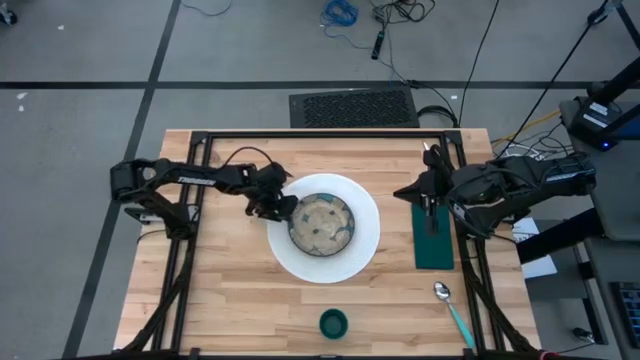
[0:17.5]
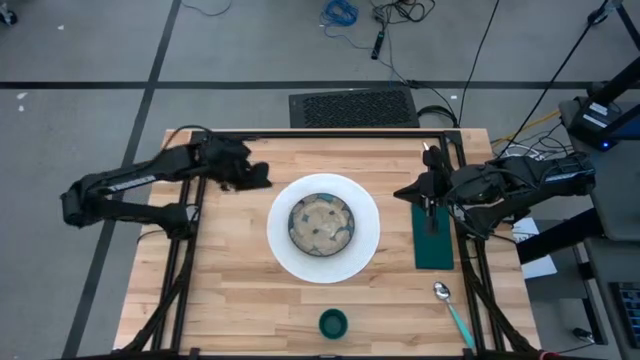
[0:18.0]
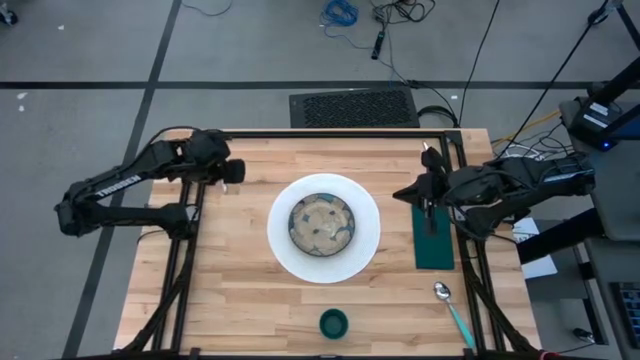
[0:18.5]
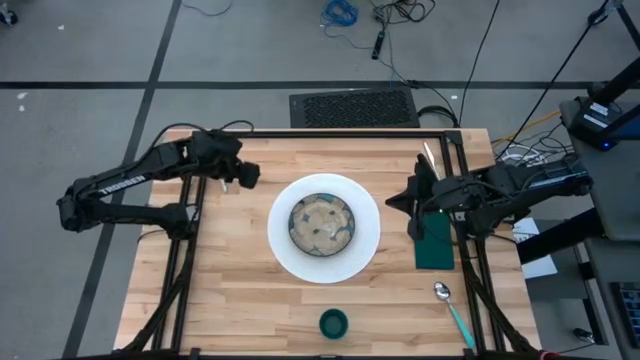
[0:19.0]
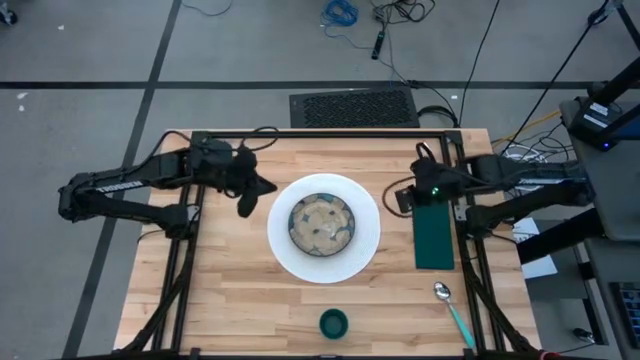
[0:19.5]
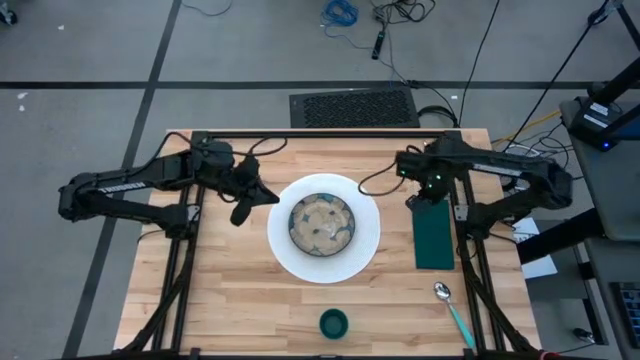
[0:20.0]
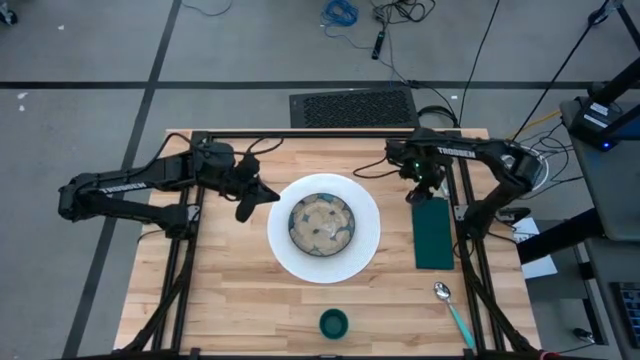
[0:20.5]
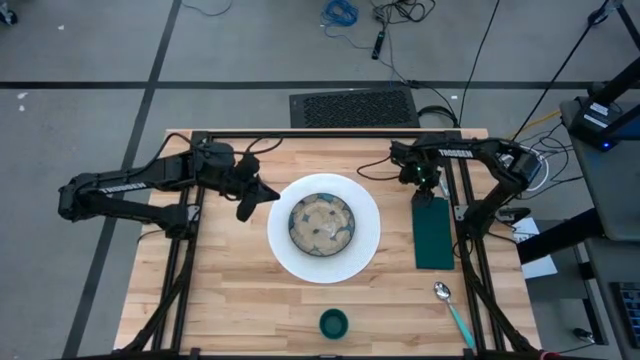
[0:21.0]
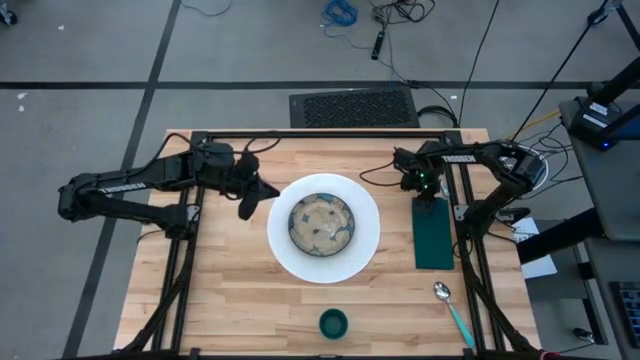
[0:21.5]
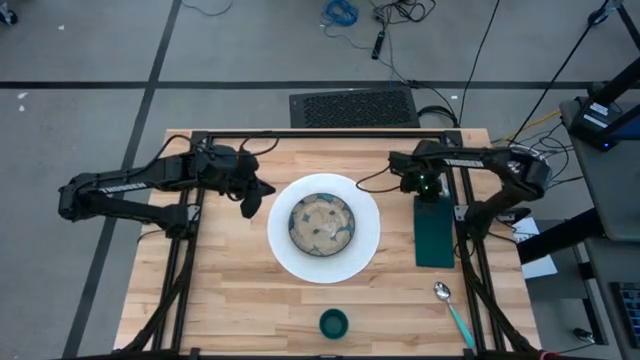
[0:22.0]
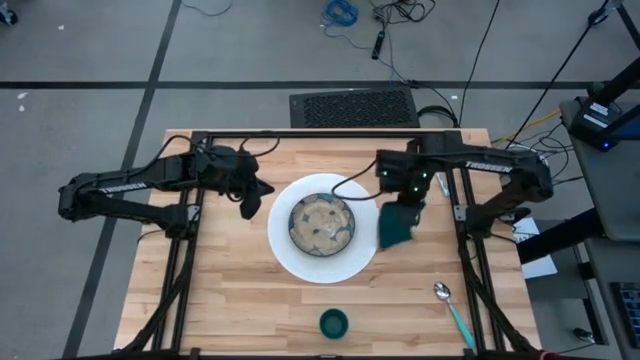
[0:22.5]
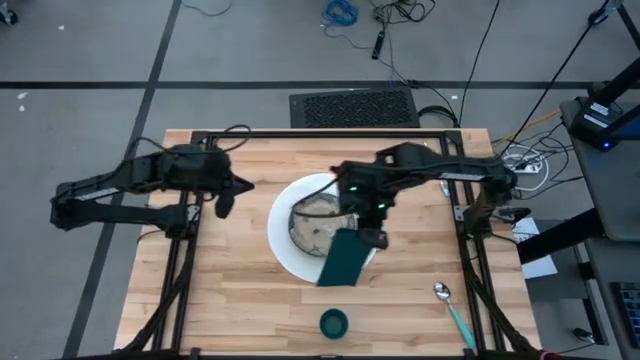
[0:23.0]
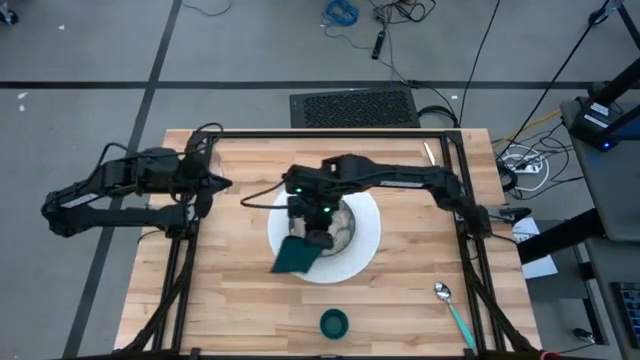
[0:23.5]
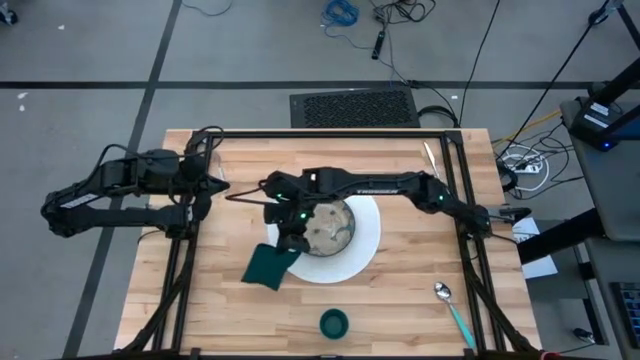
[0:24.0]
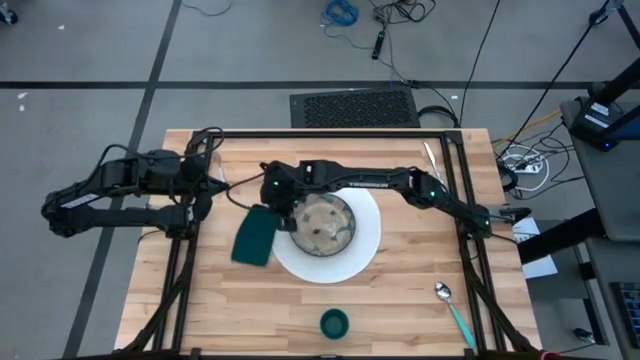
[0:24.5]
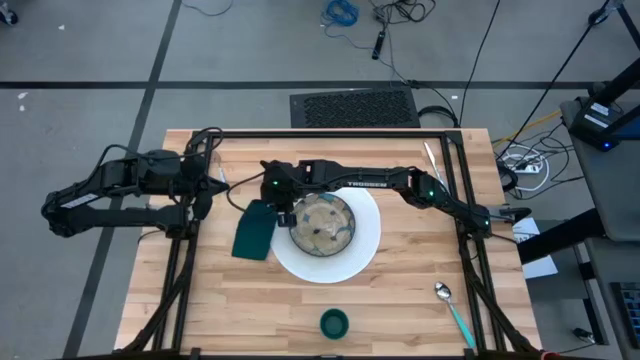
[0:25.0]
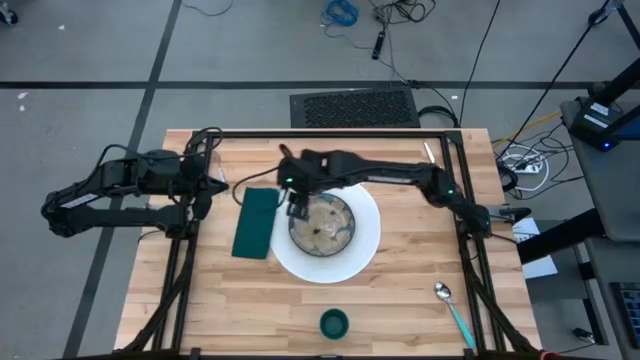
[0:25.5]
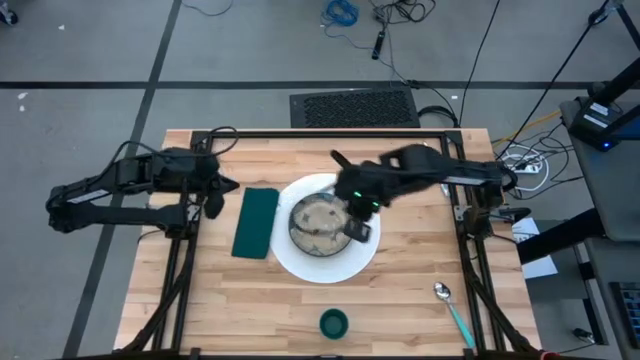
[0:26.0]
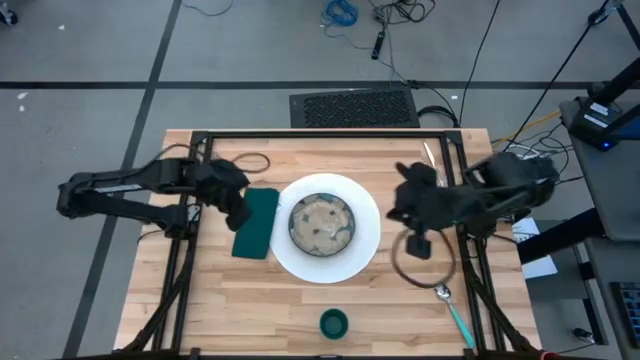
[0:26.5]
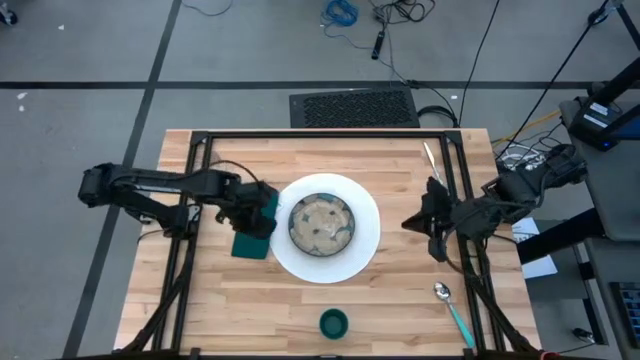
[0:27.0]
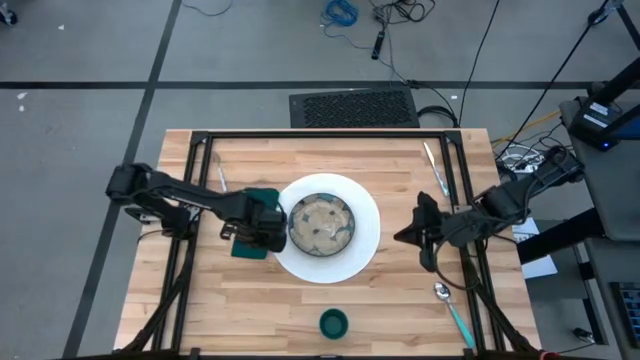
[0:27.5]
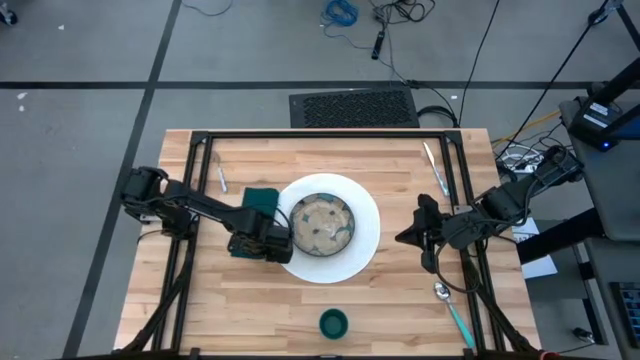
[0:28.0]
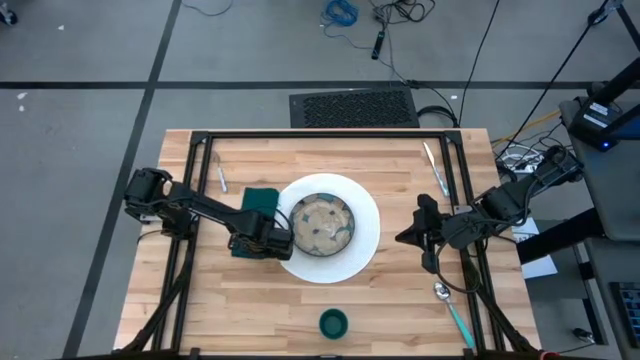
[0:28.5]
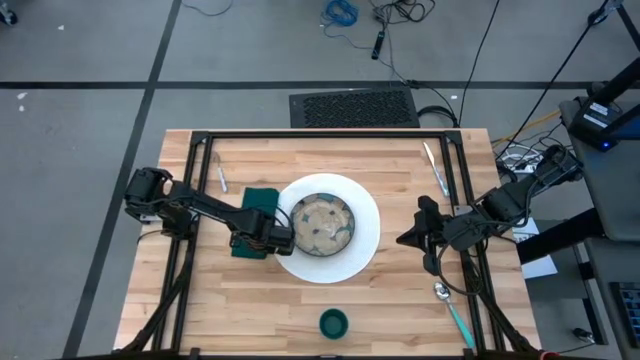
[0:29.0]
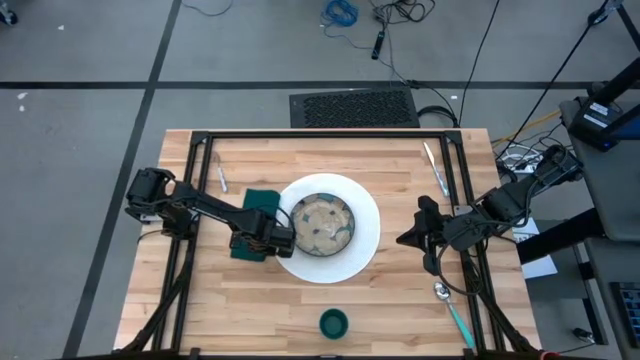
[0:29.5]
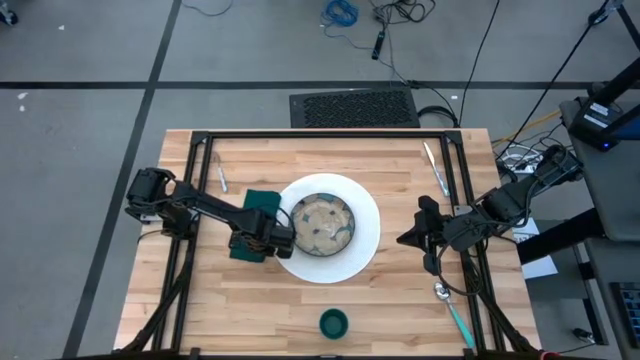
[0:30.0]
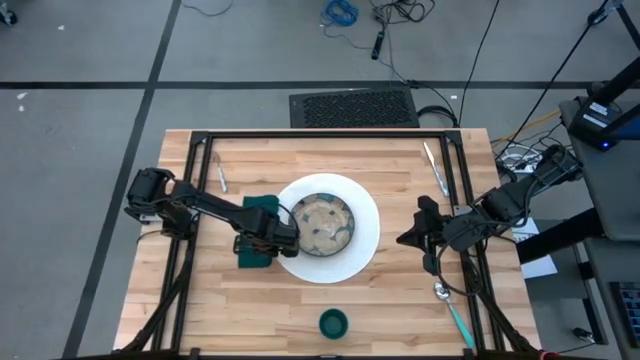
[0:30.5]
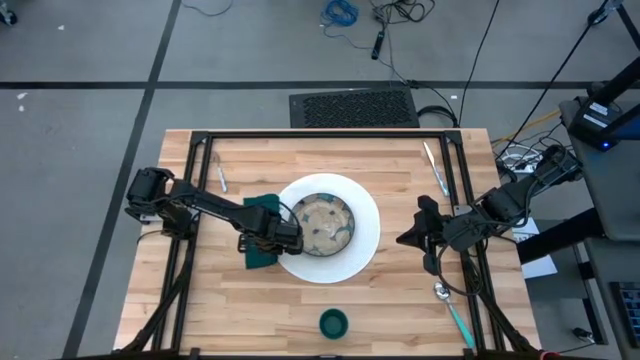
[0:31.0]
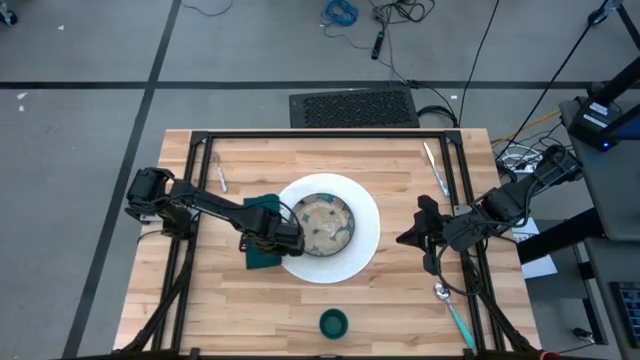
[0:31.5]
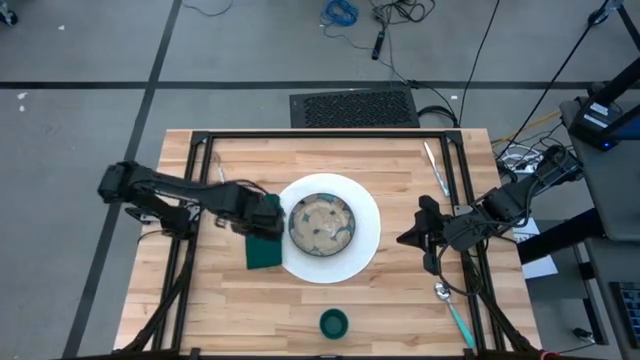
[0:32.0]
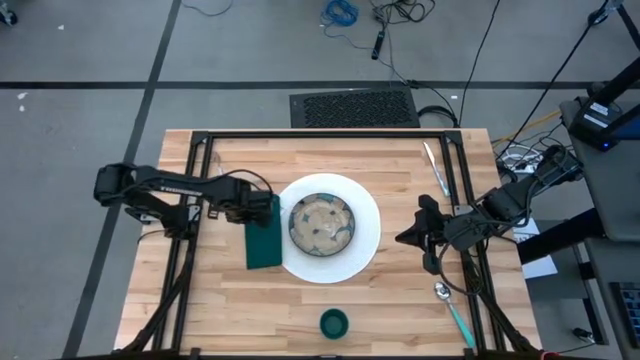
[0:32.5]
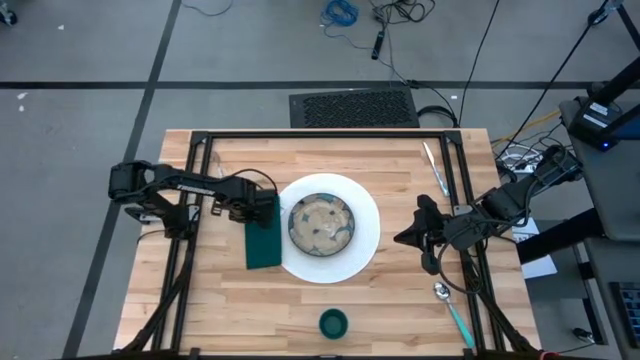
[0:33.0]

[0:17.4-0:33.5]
Task: Set table place
Put the dark napkin to the left side of the brown plate

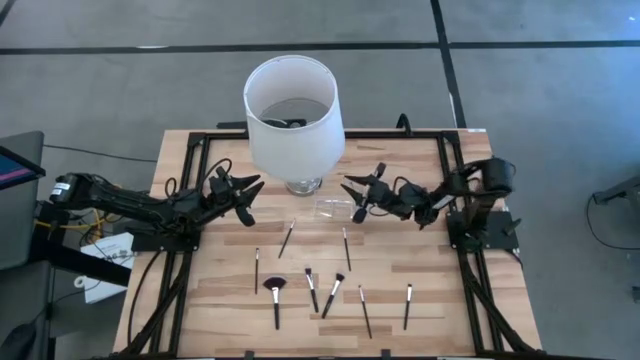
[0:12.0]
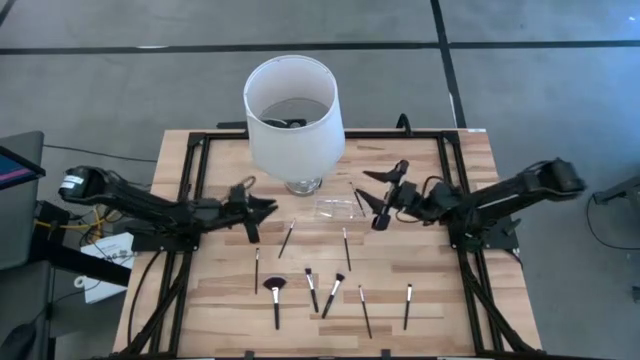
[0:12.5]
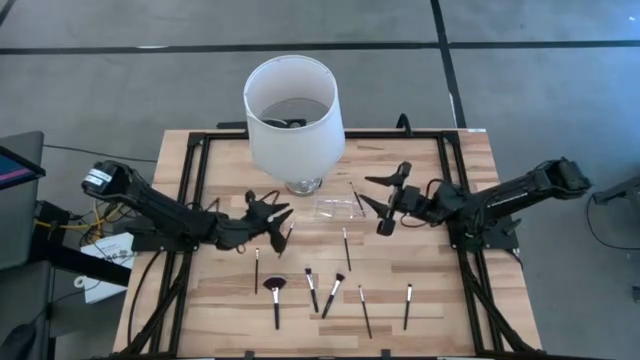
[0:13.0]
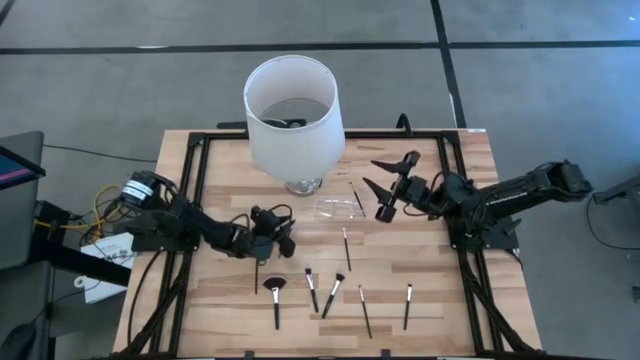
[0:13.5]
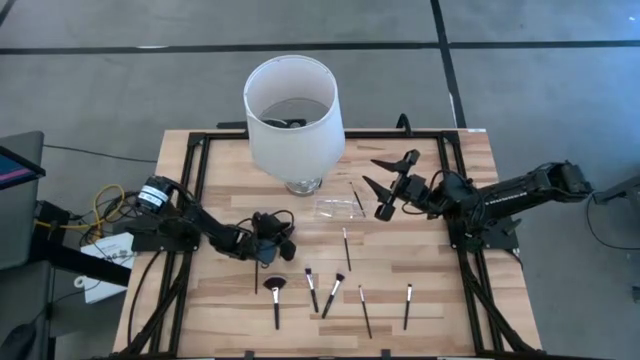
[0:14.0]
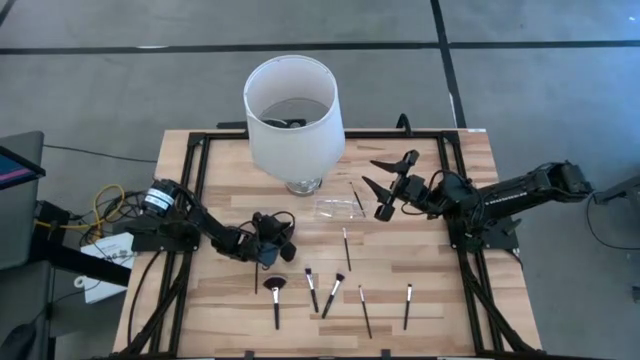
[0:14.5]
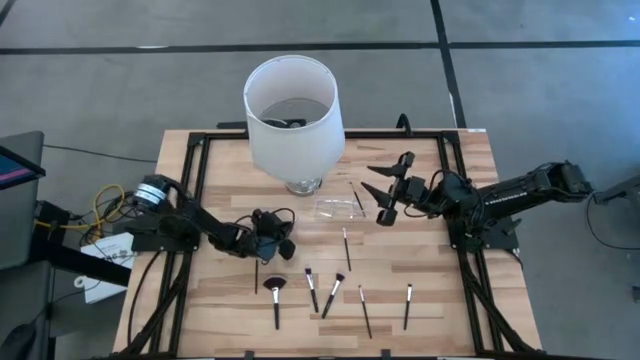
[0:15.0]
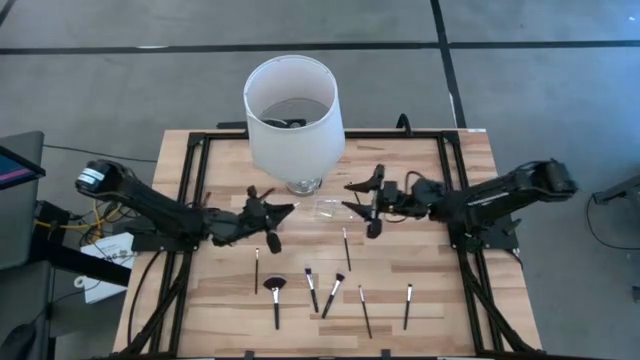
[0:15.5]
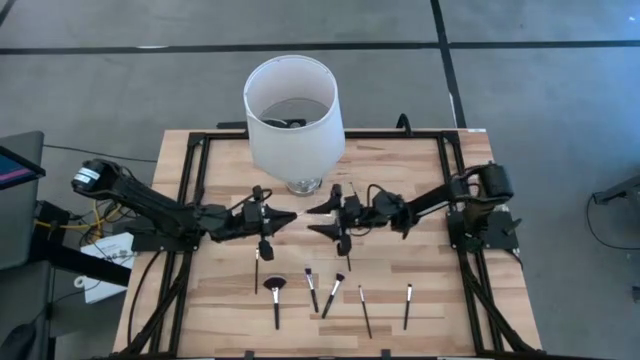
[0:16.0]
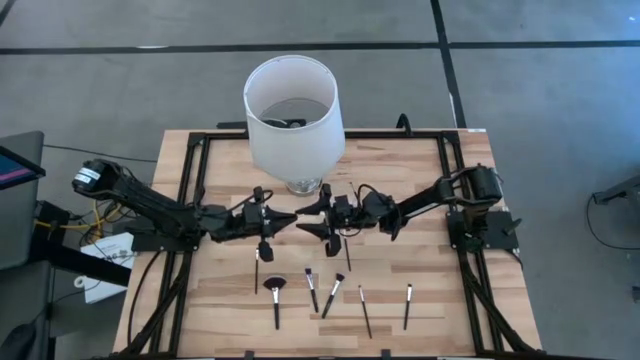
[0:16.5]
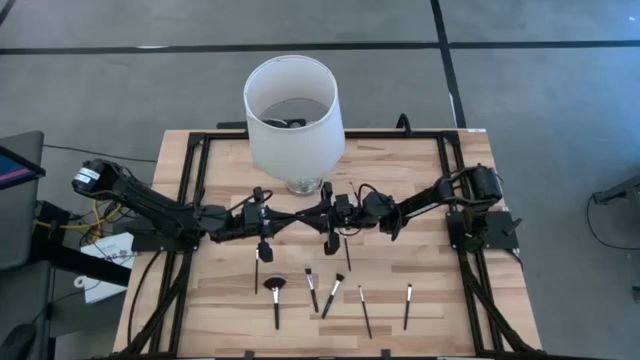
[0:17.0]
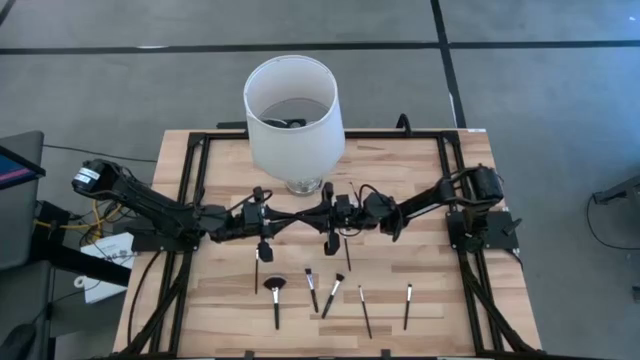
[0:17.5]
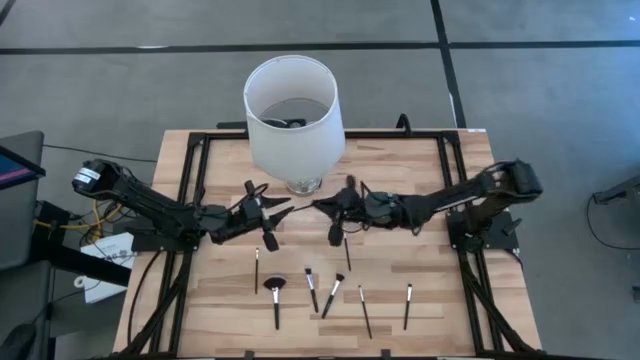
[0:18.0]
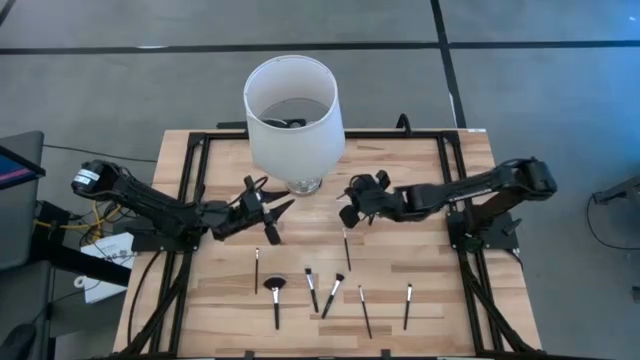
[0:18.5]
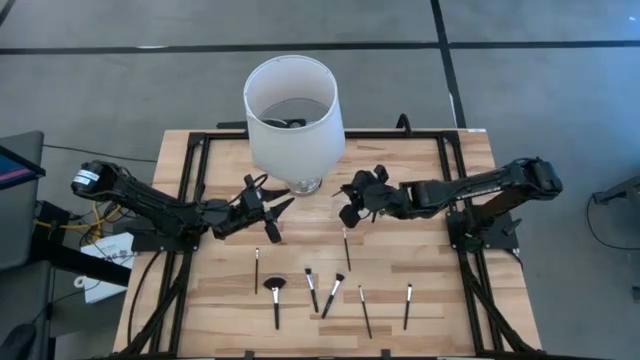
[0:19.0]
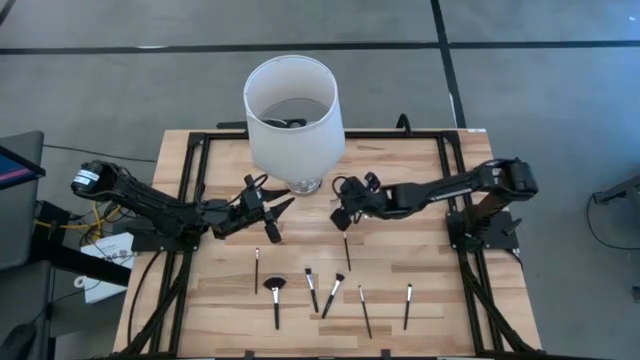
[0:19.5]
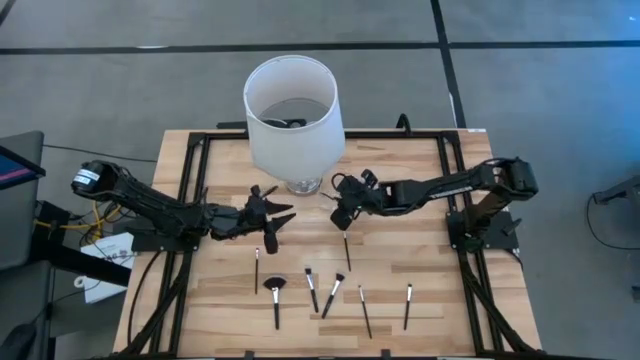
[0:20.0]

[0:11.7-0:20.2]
Task: Put items in baskets/containers
Put the black liner brush into the transparent organizer
